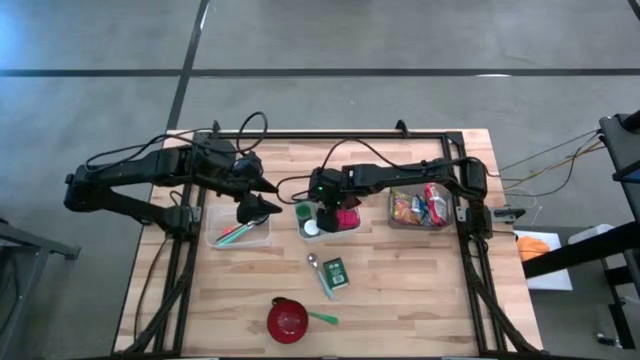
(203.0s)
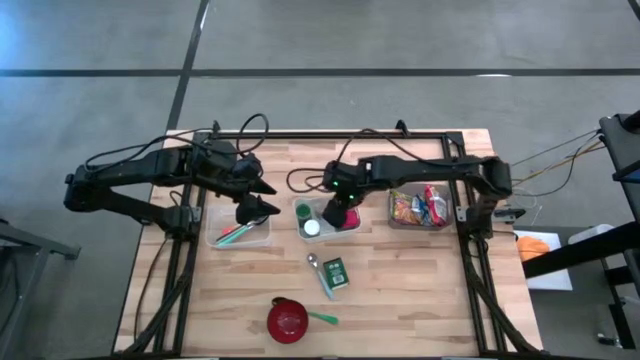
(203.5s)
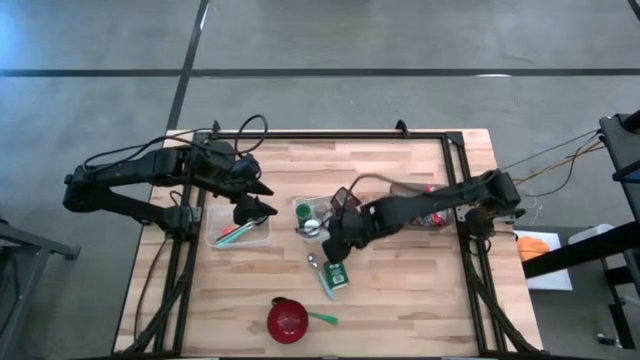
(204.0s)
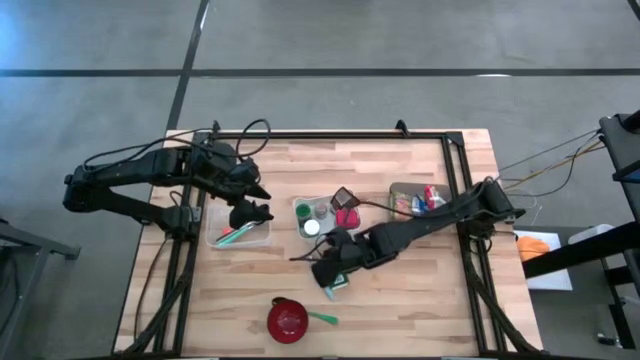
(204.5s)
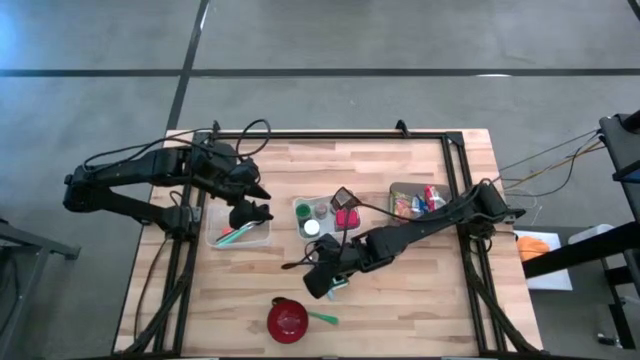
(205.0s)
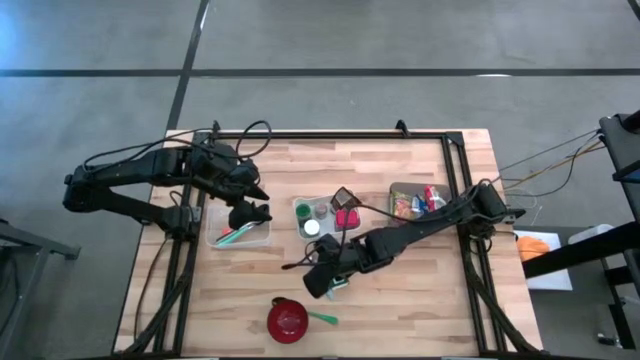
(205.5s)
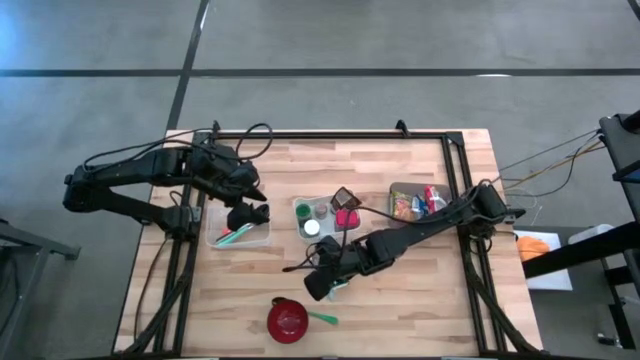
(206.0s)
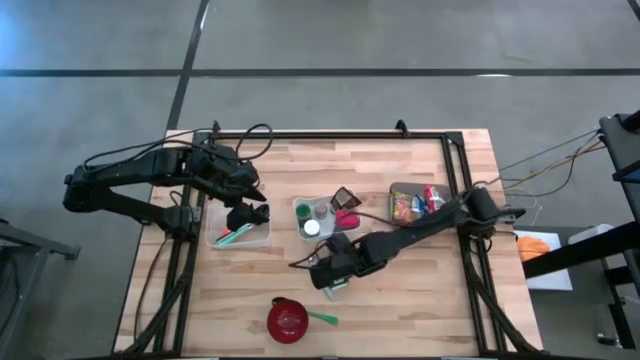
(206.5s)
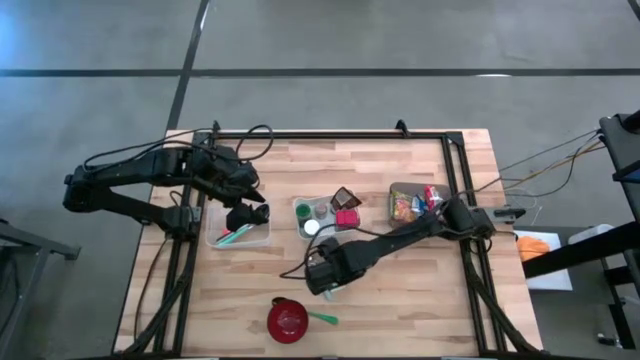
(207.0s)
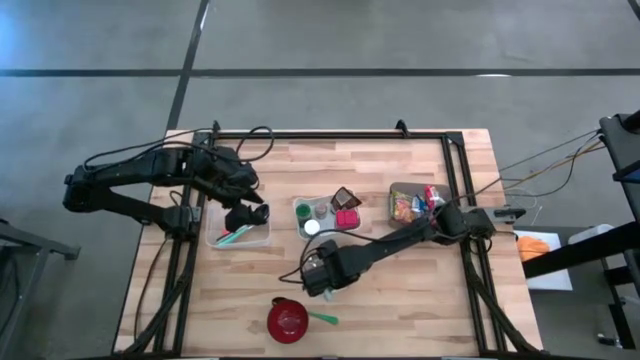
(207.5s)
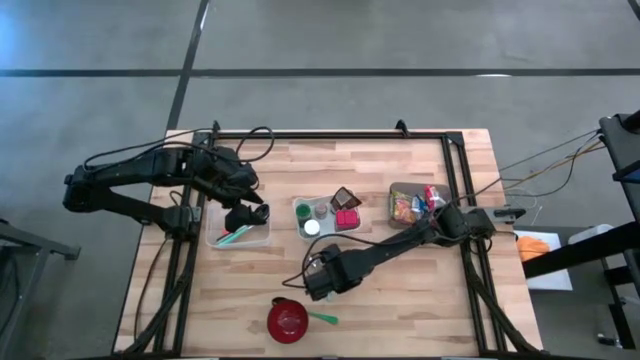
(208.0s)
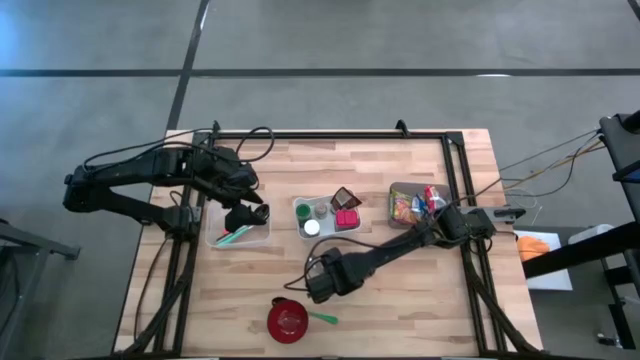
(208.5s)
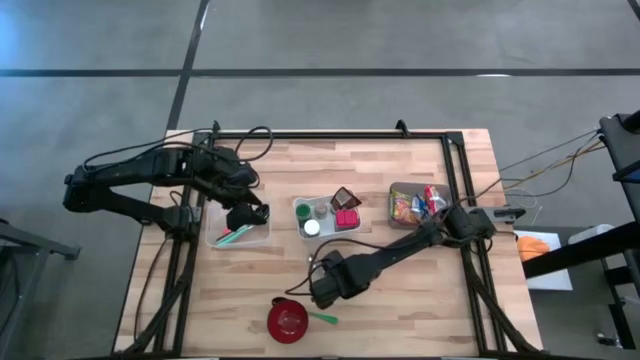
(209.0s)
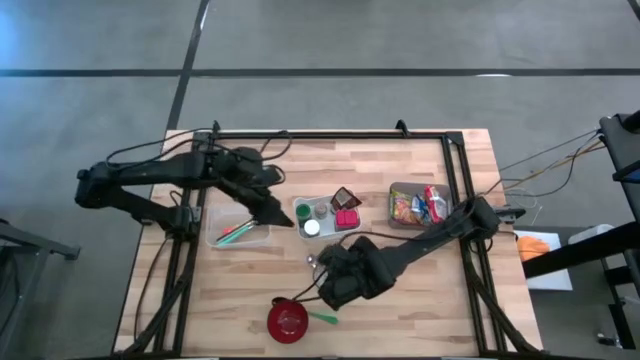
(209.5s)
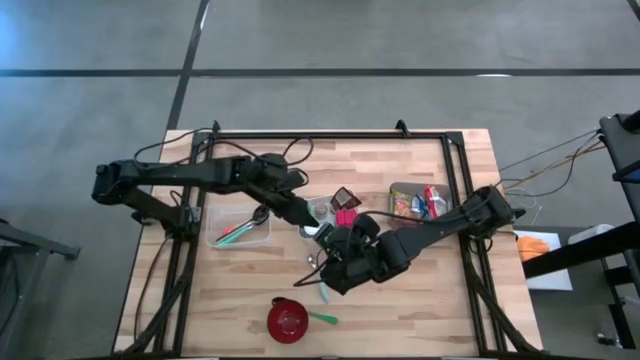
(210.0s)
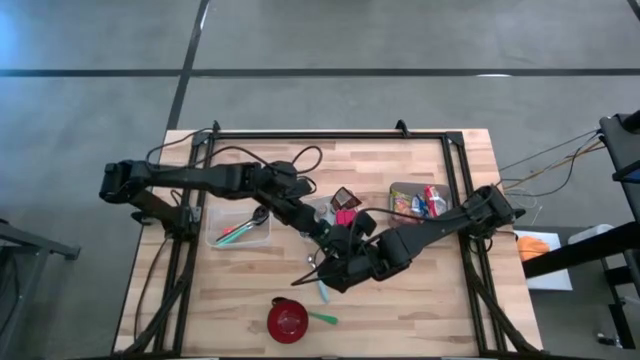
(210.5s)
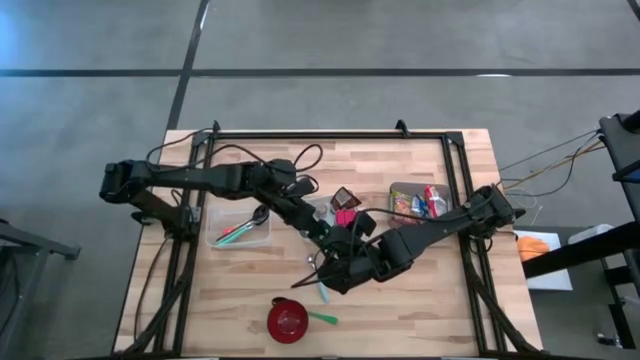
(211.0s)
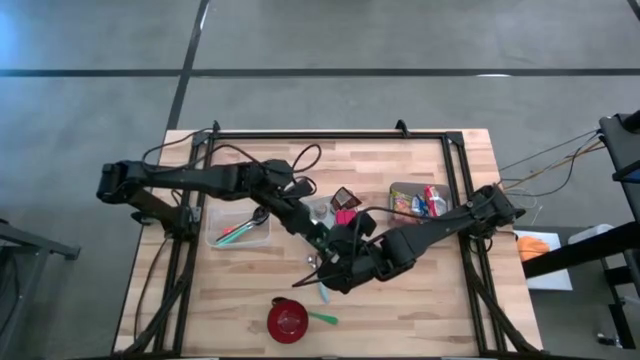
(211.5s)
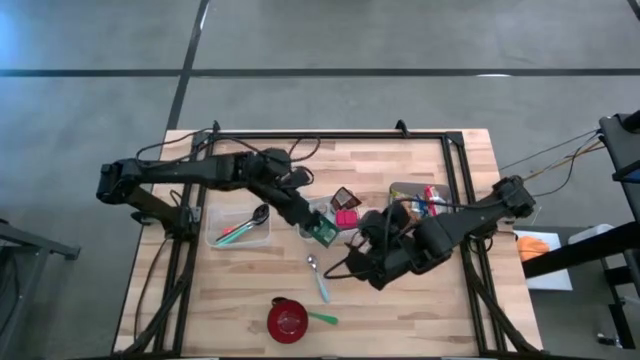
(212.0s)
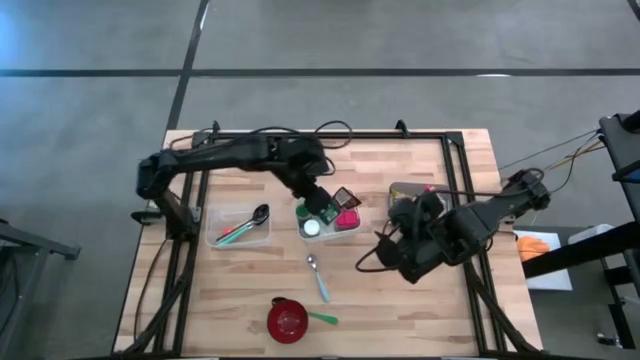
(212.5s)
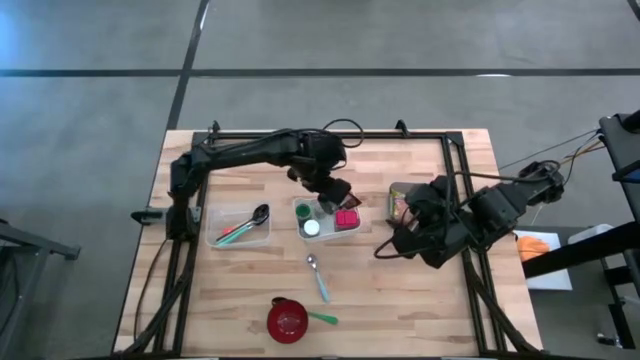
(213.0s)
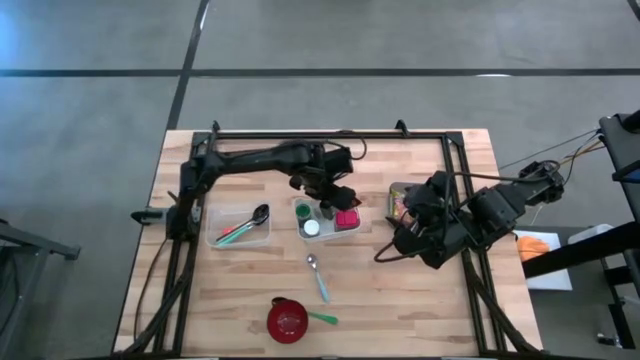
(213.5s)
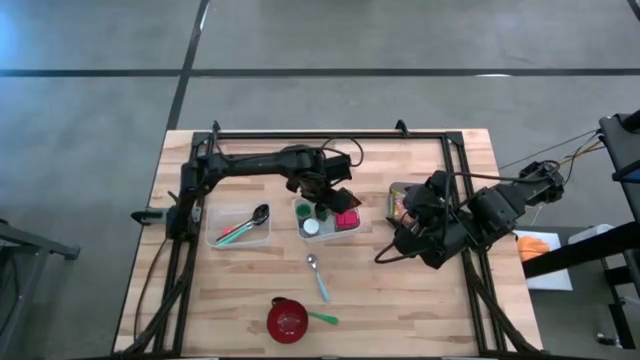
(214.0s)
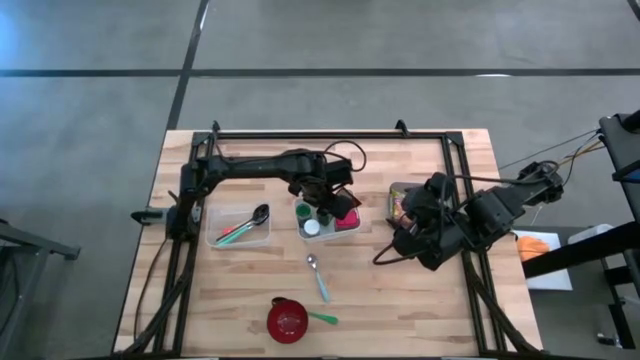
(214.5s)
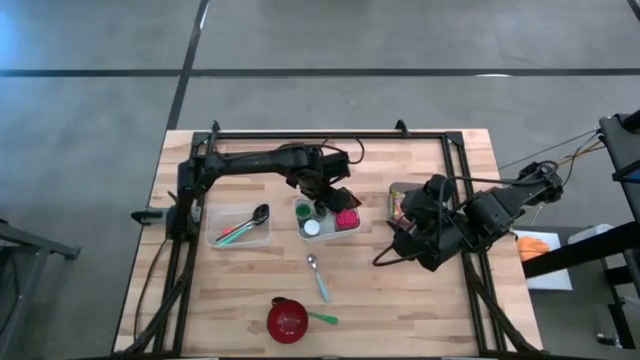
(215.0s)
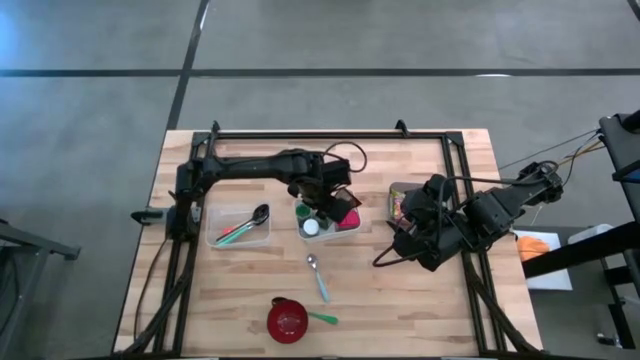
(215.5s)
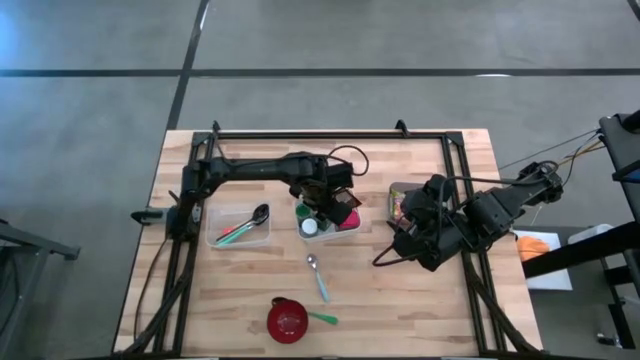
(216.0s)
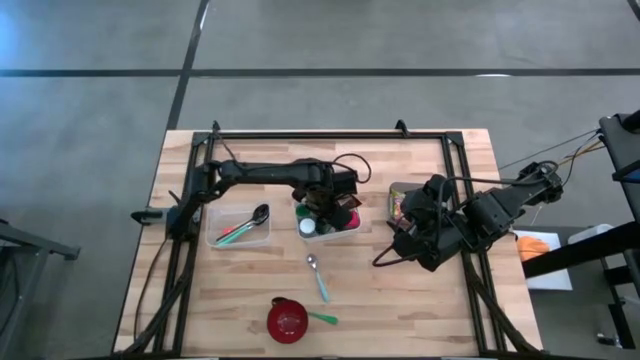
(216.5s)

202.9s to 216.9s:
Put the green seasoning can into the white bin

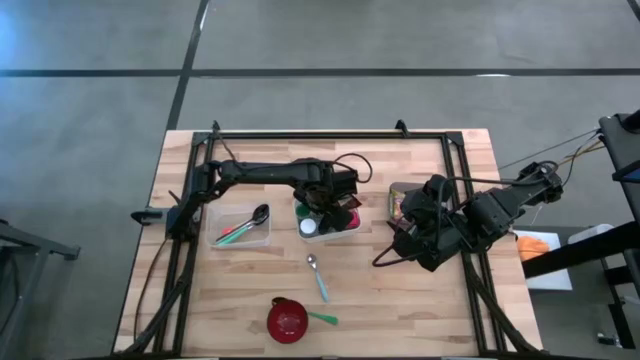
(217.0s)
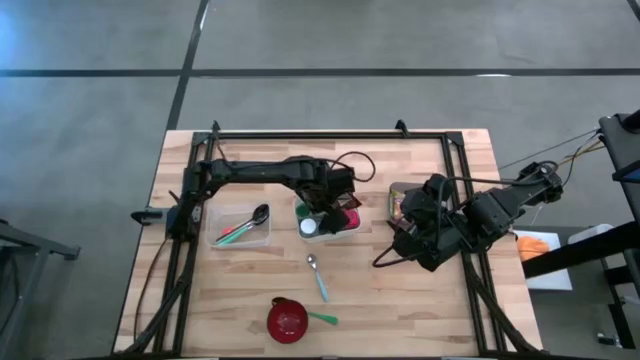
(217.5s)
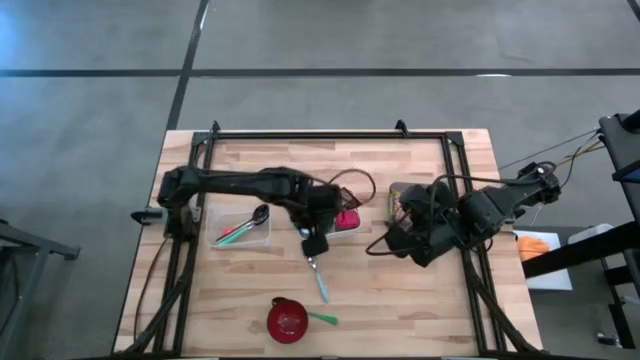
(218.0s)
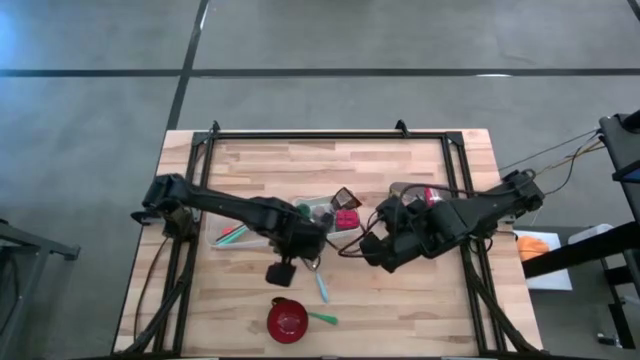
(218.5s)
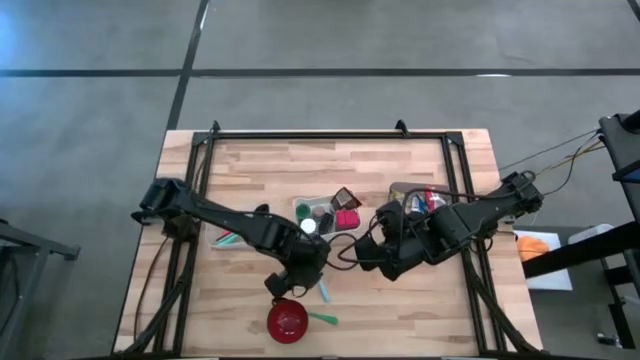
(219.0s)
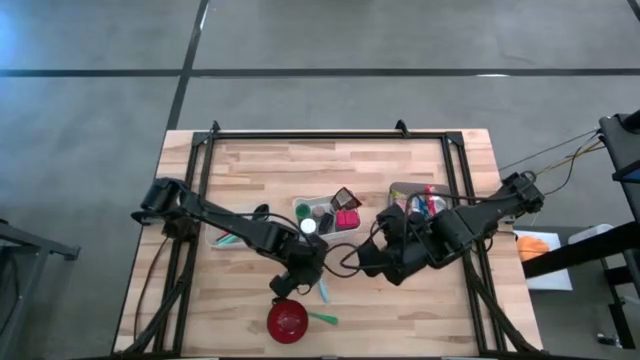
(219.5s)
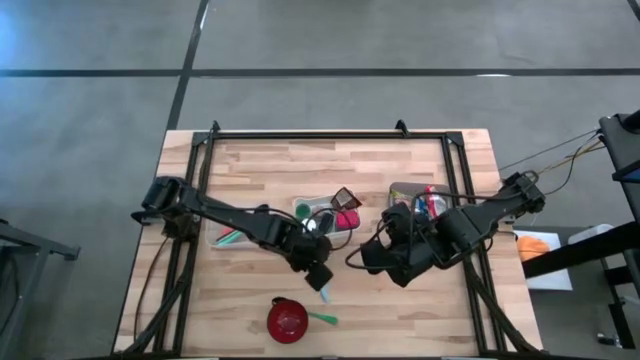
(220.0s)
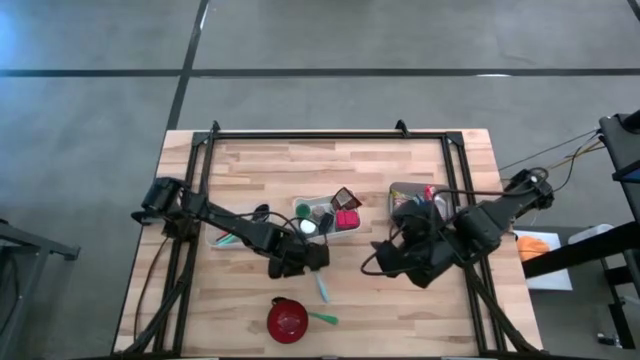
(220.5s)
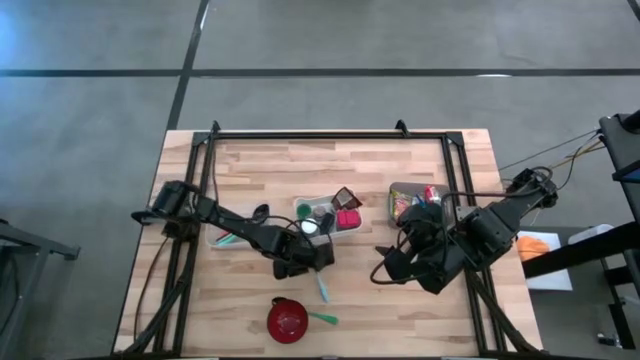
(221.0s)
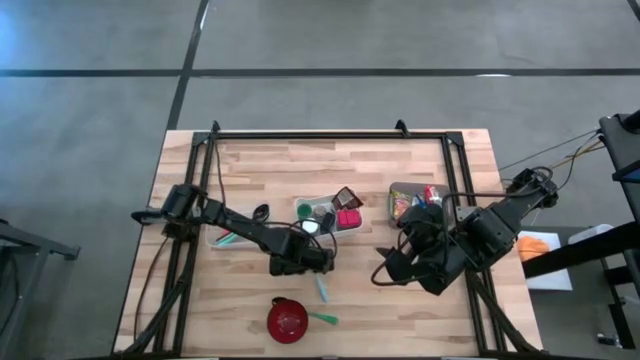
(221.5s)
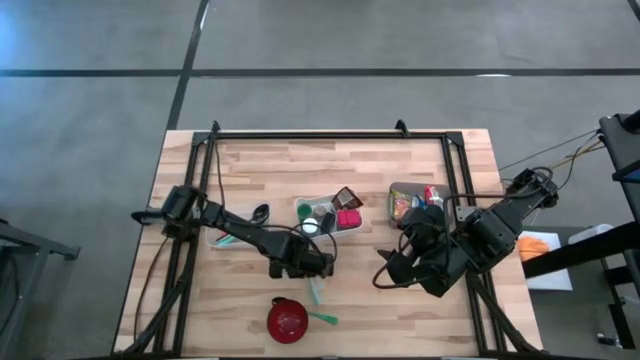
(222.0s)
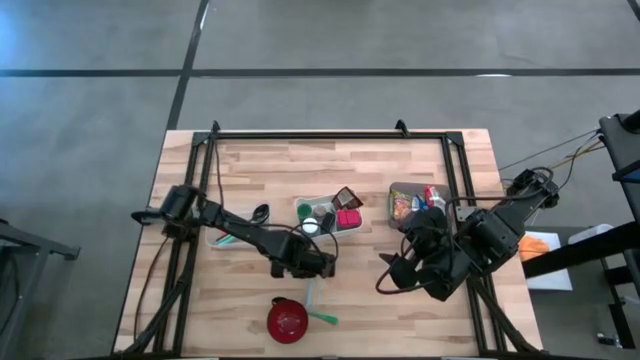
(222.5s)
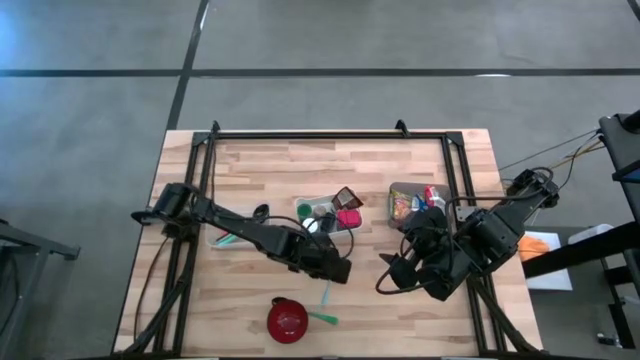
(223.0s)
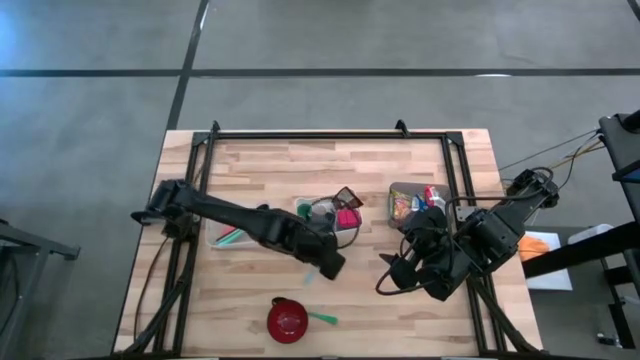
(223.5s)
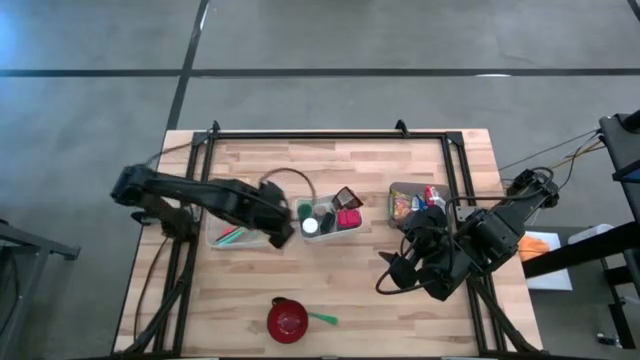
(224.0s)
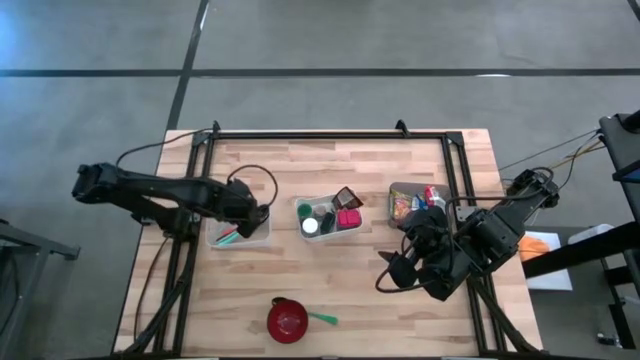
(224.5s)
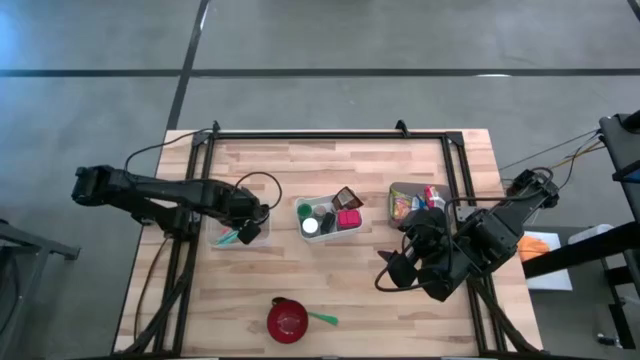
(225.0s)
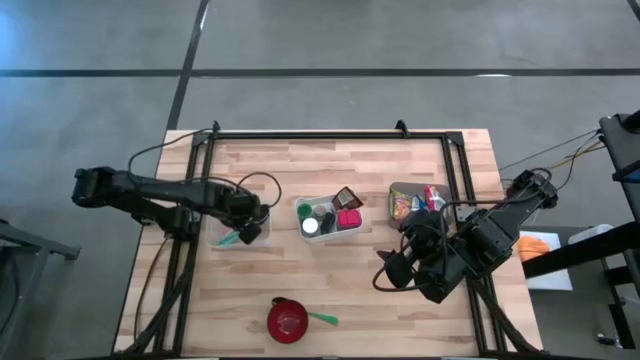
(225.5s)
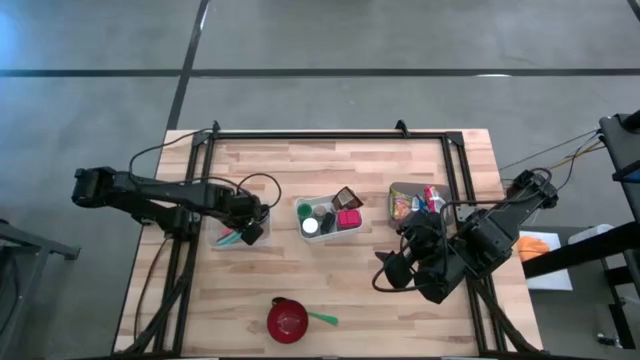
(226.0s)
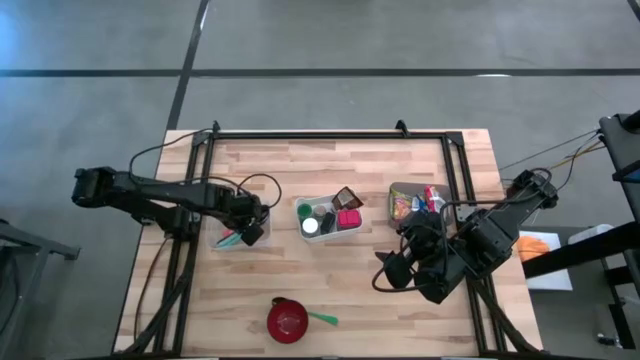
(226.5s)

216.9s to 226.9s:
Put the blue spoon into the transparent bin
